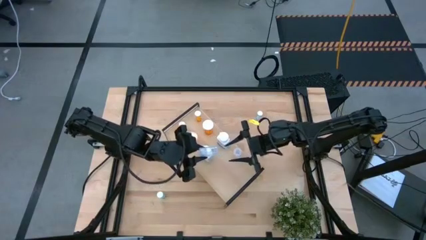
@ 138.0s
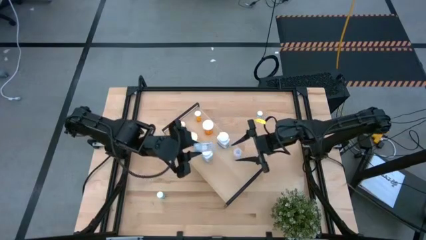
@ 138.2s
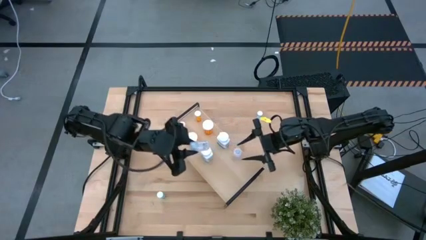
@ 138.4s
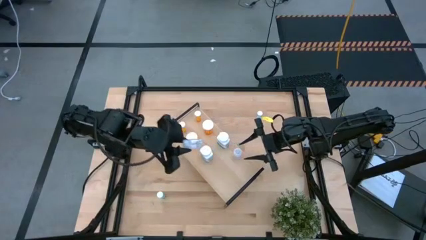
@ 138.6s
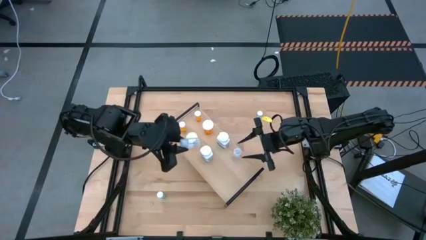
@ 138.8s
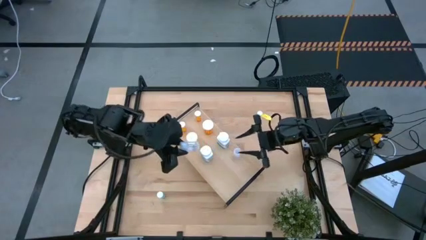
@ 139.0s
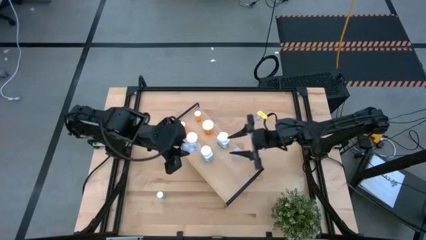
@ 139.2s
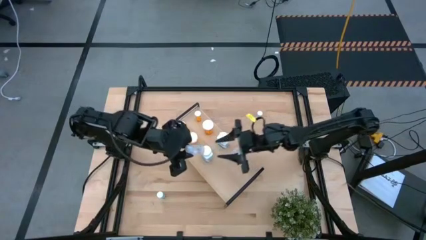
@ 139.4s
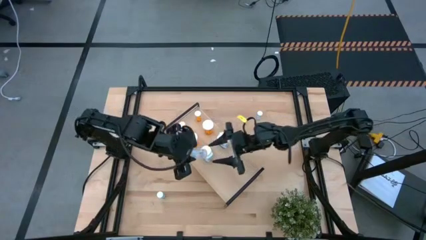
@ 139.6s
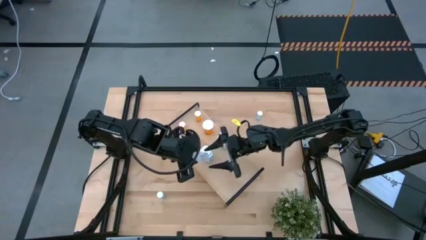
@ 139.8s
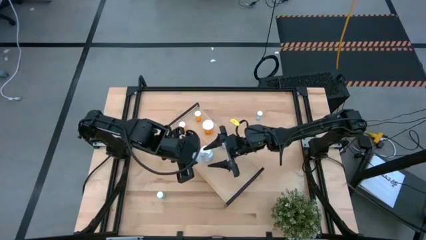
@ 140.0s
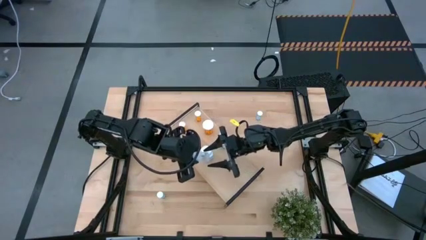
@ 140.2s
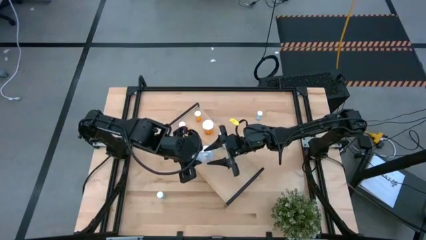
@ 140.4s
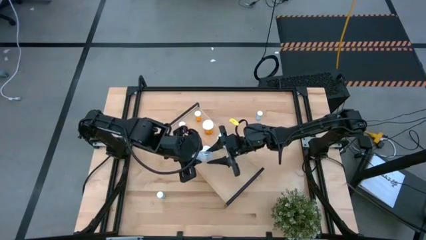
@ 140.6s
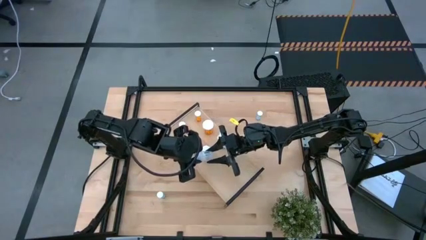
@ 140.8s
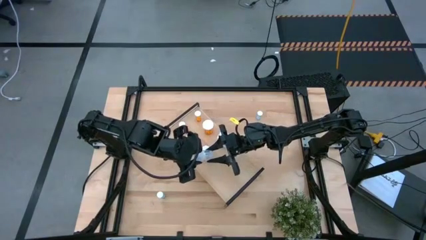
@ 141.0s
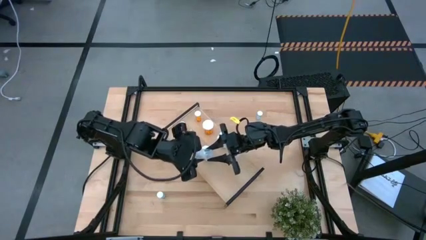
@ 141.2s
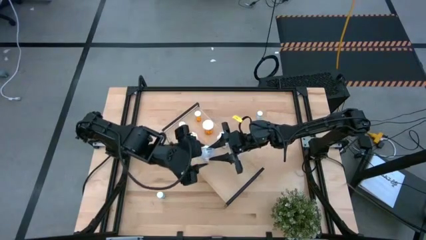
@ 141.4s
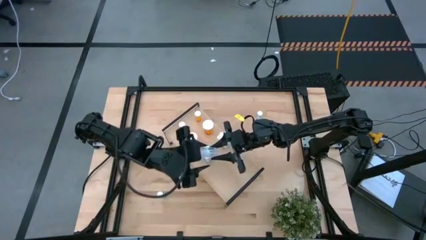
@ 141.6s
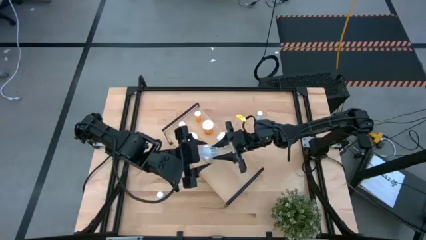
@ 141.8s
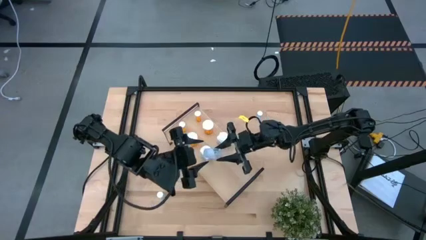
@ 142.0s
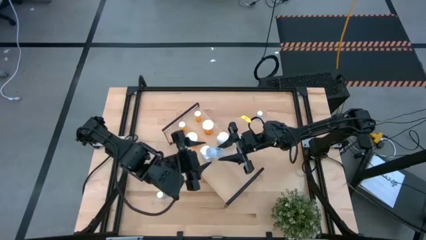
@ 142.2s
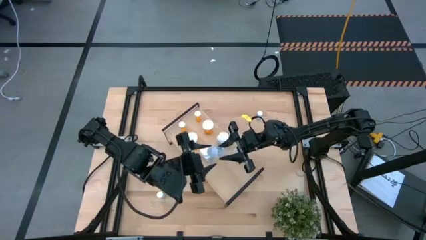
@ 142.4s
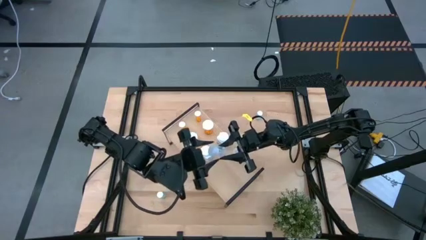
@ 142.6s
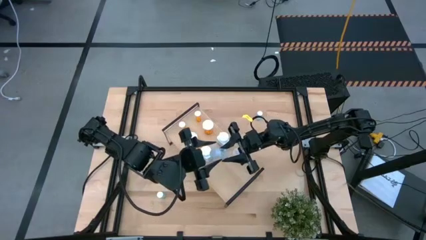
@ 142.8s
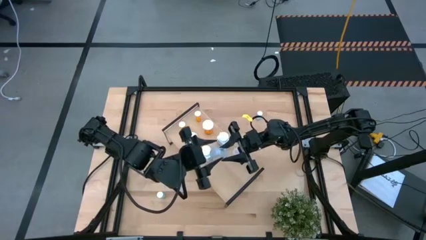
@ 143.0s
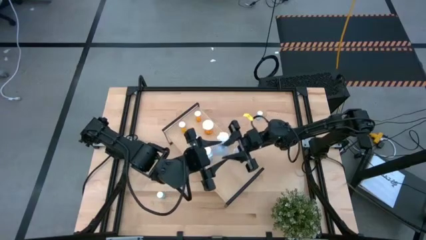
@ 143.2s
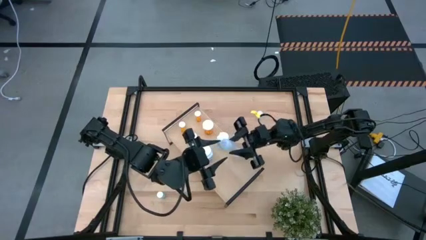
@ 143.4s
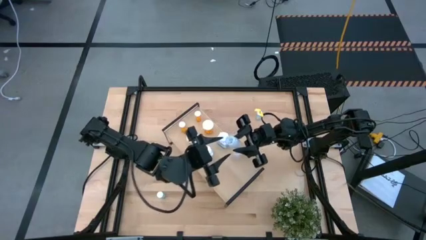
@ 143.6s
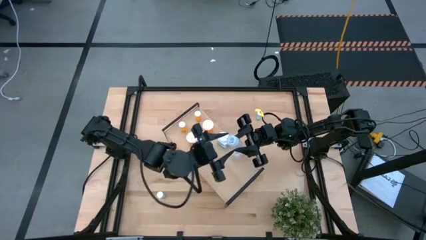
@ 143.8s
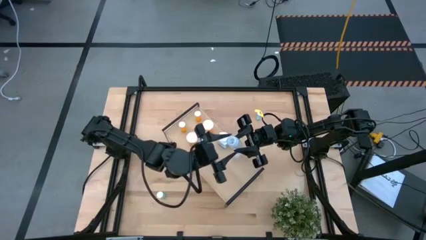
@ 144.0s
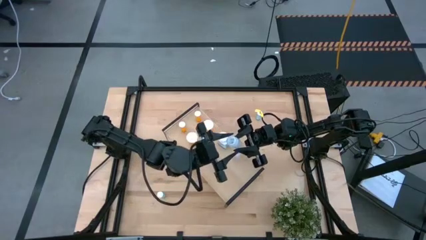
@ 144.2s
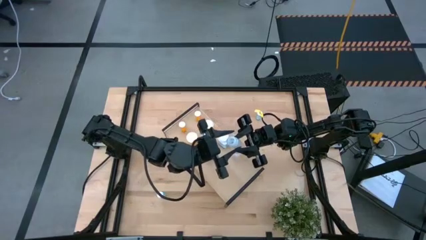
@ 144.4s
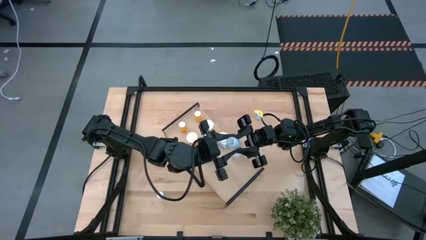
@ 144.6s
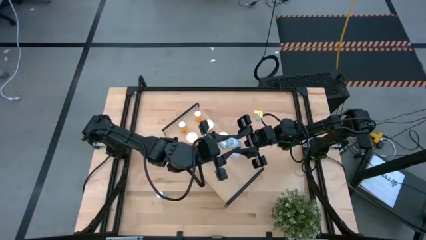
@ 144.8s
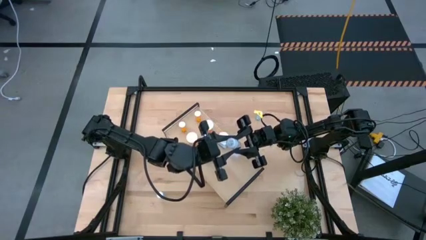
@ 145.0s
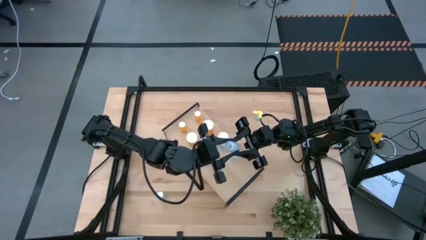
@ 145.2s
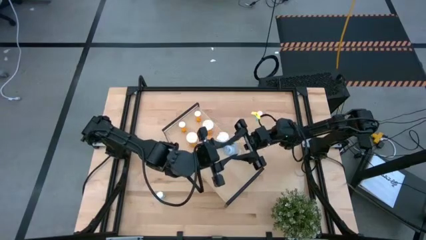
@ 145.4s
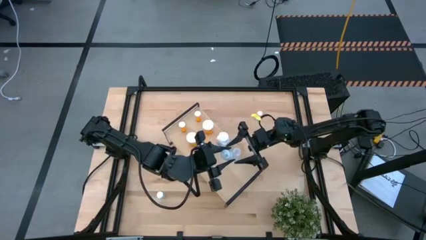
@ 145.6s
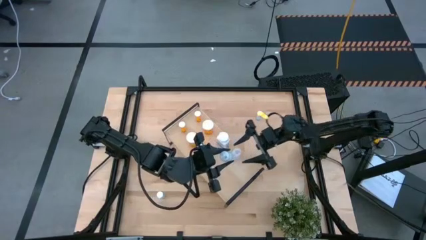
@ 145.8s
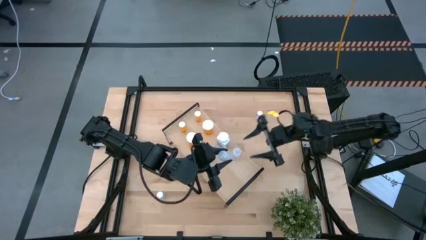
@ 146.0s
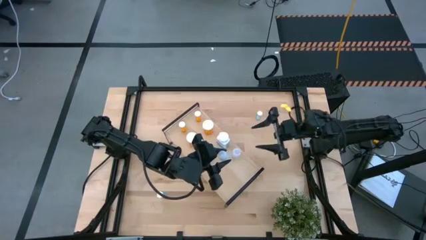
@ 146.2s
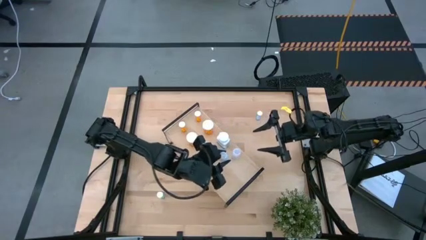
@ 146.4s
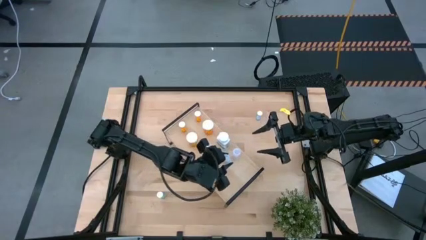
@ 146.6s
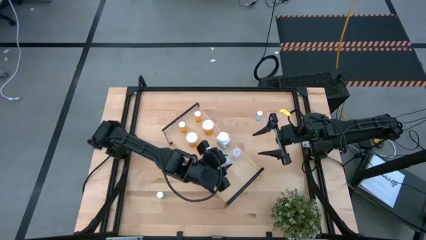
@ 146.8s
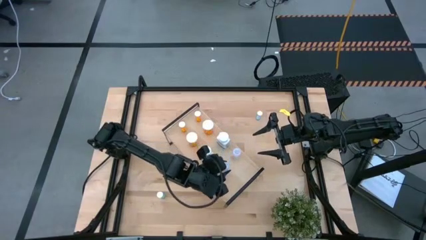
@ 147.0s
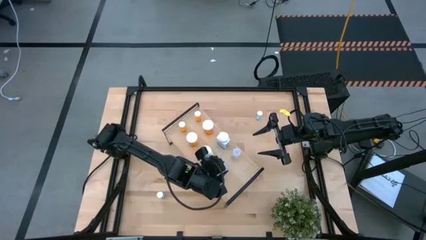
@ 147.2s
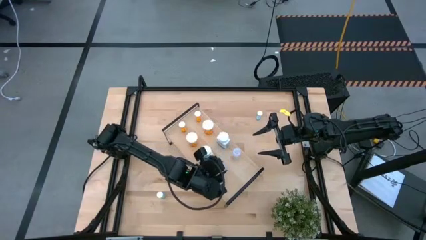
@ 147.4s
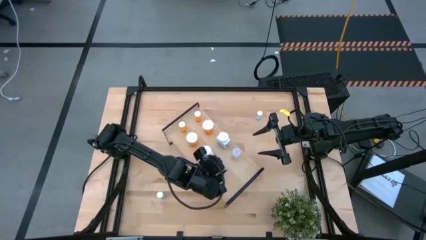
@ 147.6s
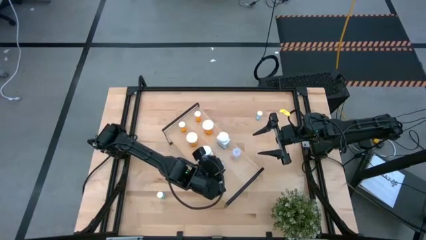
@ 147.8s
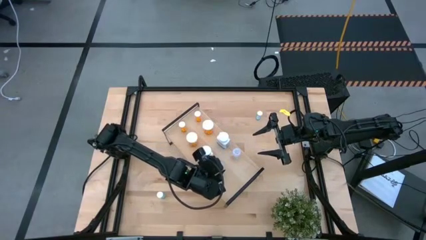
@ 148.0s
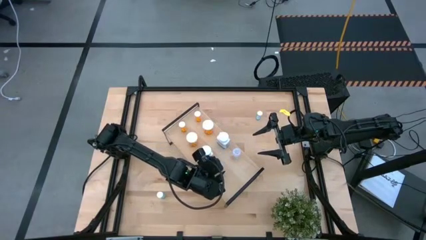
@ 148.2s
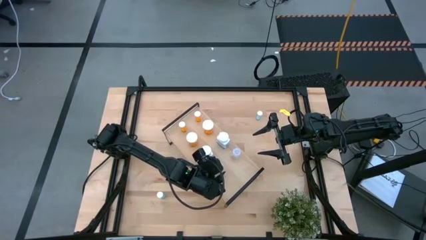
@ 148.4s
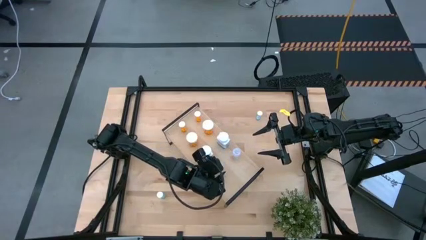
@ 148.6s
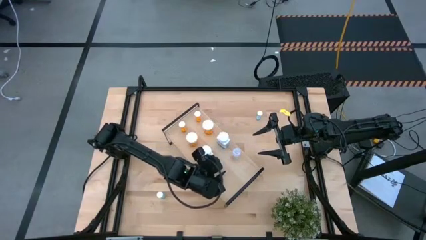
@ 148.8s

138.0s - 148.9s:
Task: Pick and place medicine bottles onto shelf by color
Put the transparent pill bottle on the shelf aligned with the transparent pill bottle

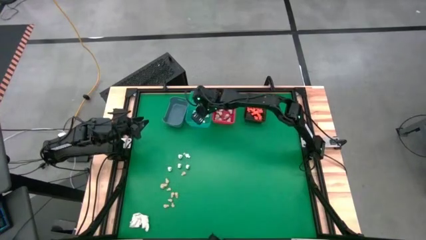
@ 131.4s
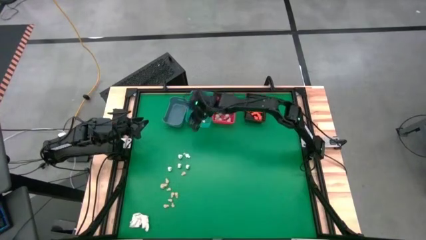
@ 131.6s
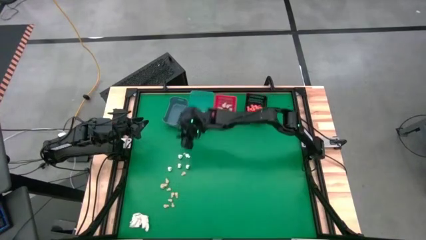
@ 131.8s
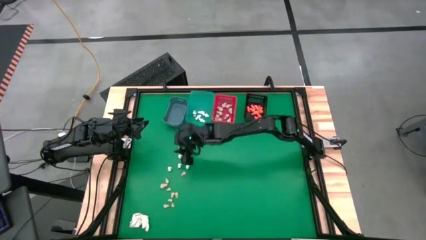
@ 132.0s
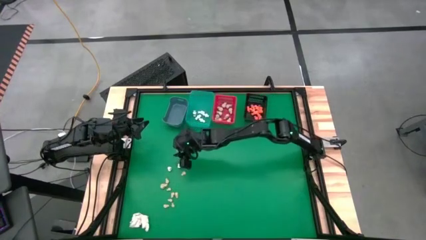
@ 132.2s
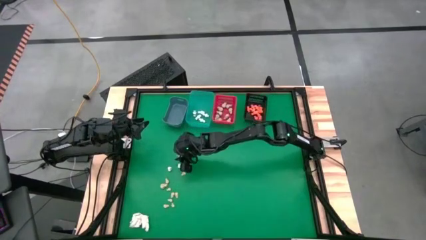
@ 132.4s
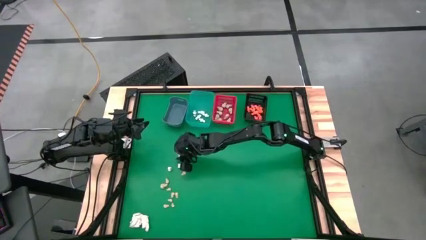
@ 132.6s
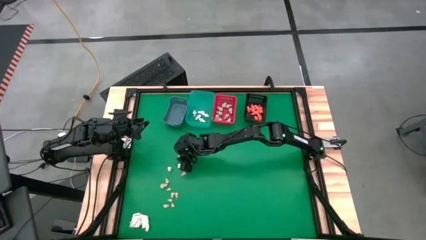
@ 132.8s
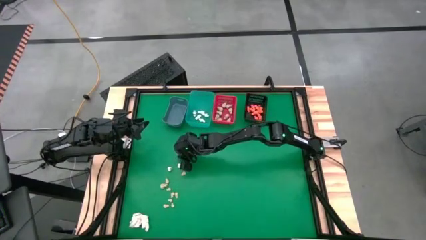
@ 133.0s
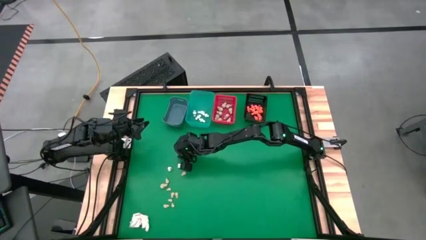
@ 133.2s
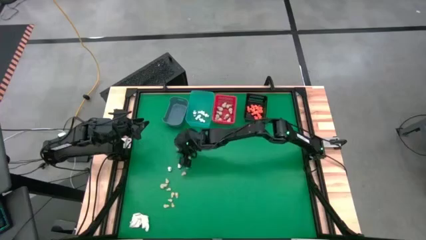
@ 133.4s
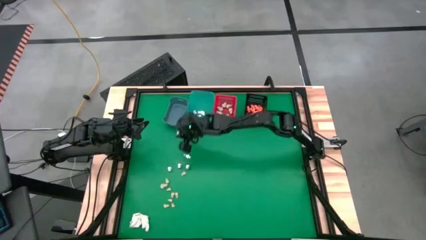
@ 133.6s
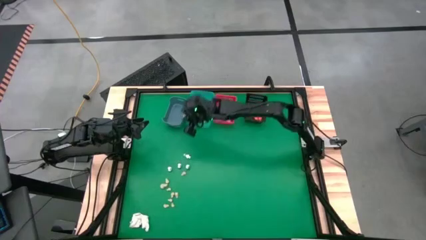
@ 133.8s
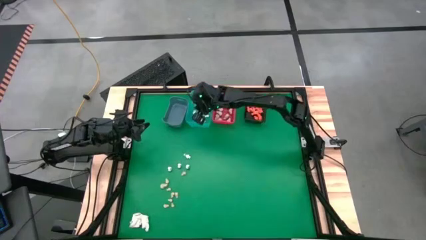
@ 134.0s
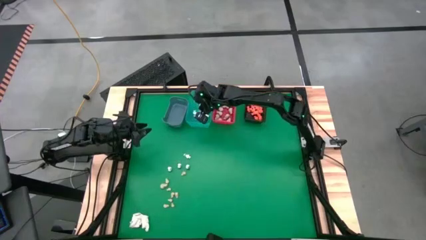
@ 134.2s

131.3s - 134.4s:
Task: Sort Halloween decoration
Put the white skeleton toy into the light blue bin

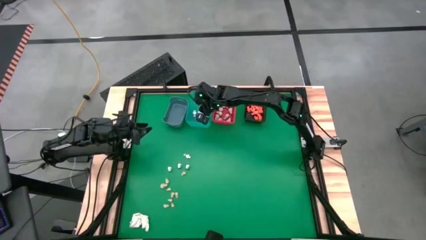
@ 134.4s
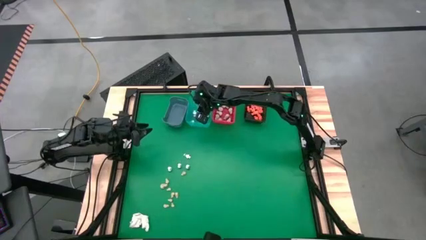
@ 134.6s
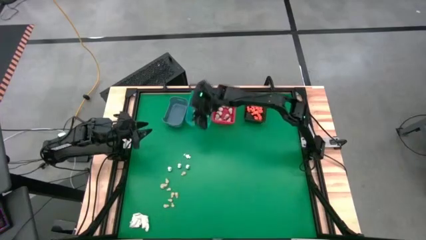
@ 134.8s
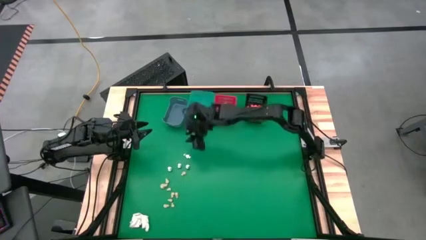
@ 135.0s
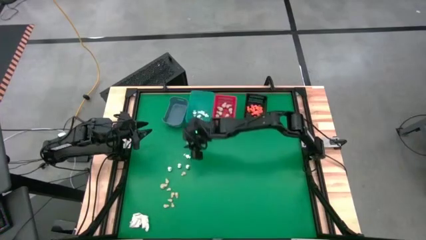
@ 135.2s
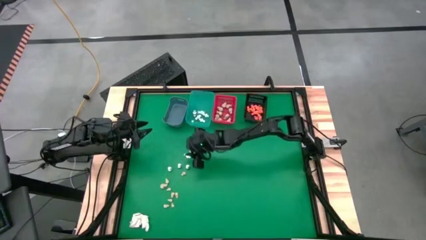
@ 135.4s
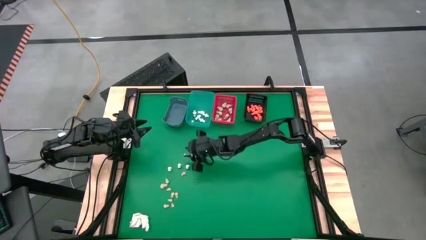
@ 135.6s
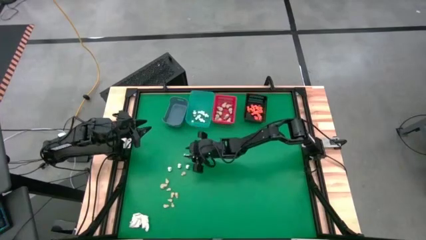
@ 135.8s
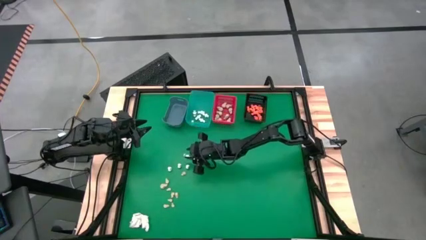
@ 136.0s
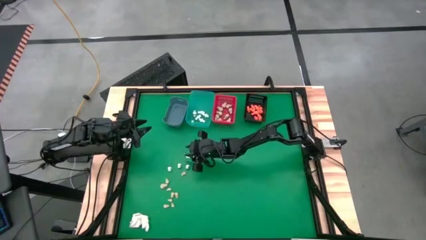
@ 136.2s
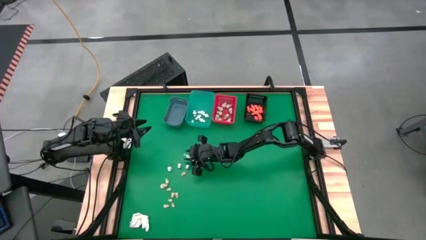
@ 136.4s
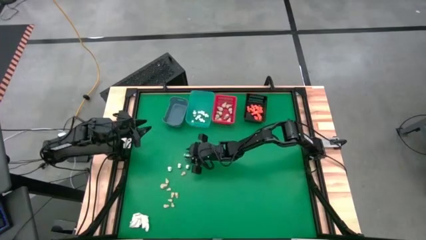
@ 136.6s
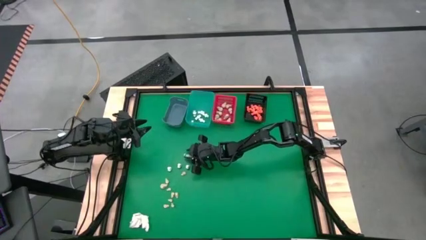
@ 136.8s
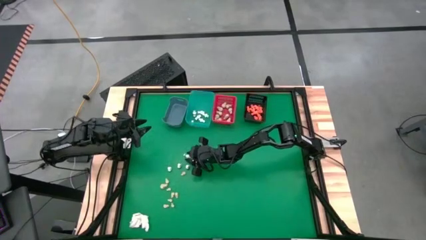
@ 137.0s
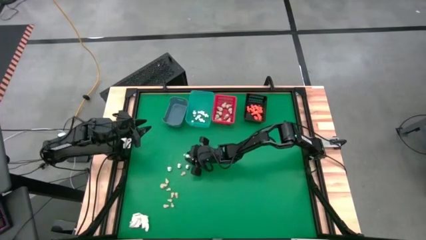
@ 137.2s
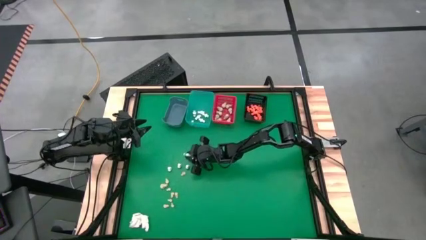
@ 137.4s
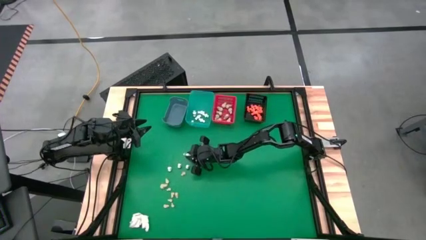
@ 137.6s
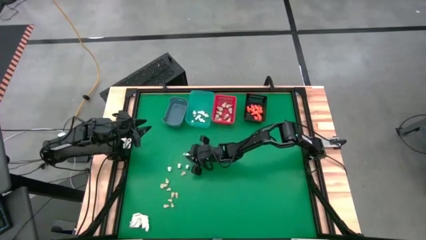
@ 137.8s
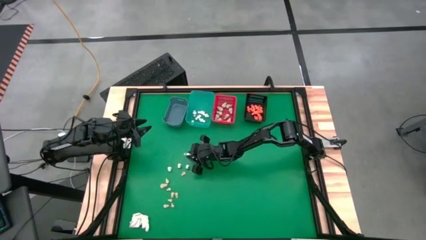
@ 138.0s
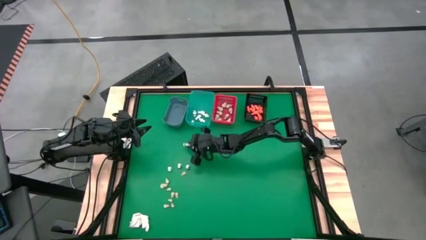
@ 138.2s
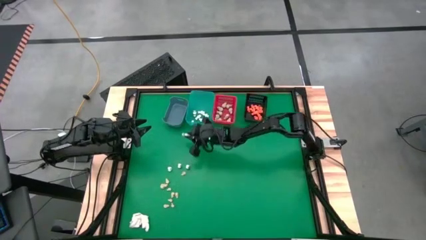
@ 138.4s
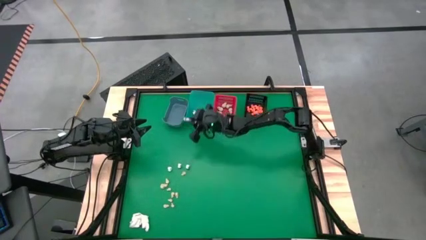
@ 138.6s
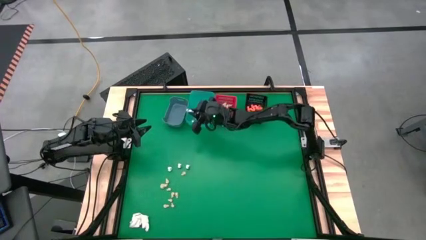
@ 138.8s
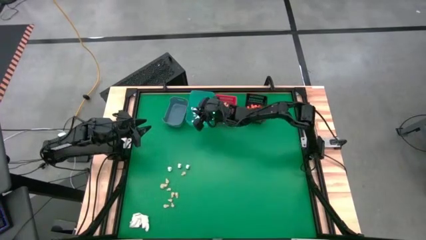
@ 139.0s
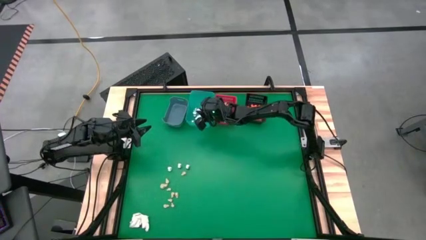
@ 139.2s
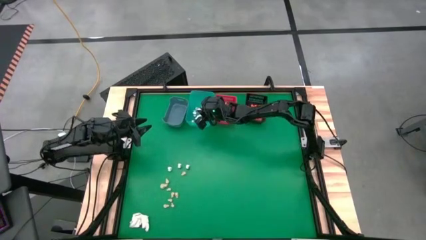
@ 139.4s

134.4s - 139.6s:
Put the white skeleton toy into the light blue bin
